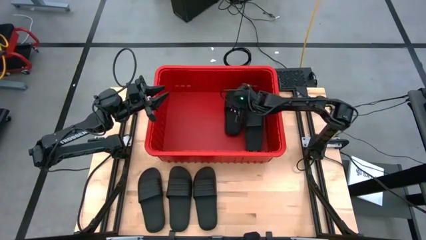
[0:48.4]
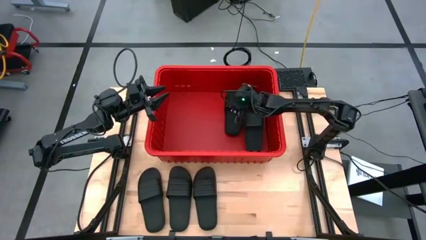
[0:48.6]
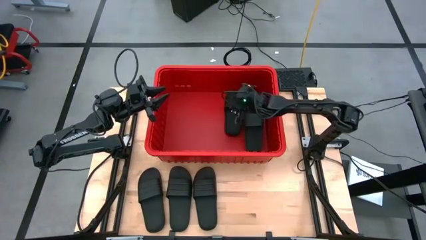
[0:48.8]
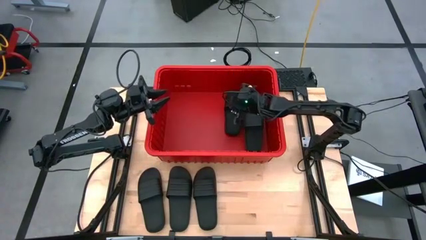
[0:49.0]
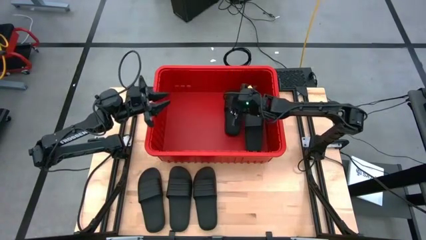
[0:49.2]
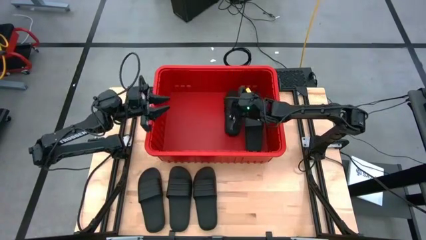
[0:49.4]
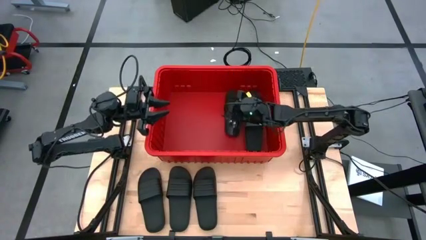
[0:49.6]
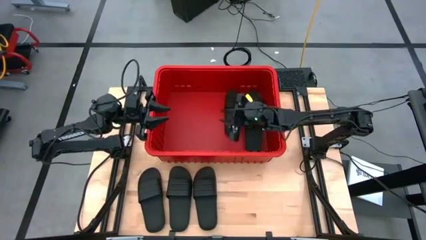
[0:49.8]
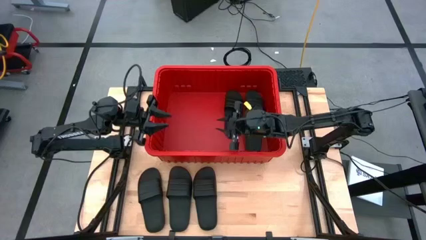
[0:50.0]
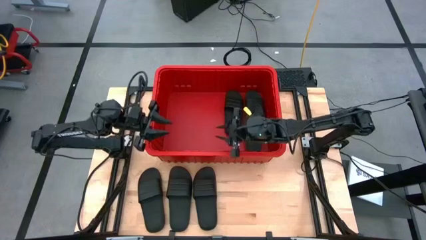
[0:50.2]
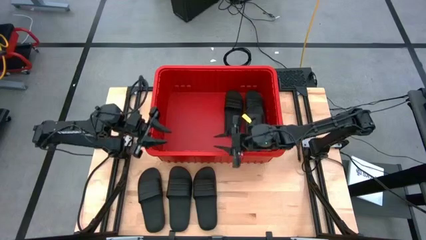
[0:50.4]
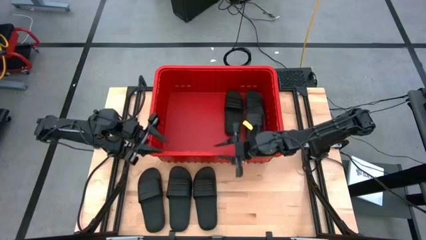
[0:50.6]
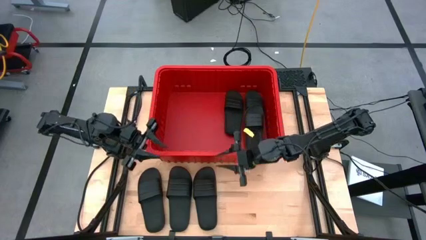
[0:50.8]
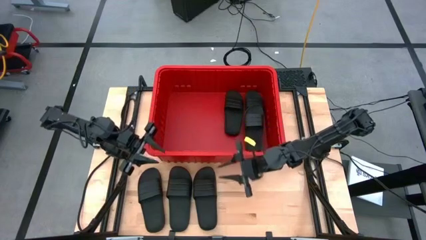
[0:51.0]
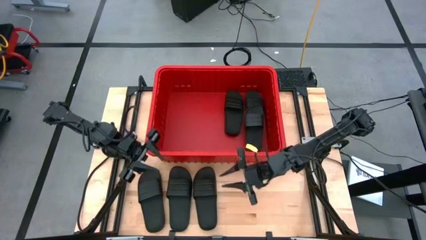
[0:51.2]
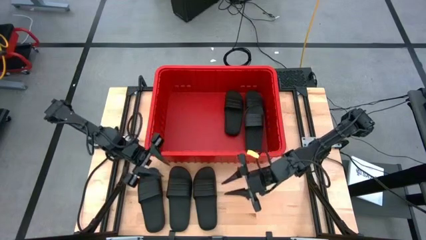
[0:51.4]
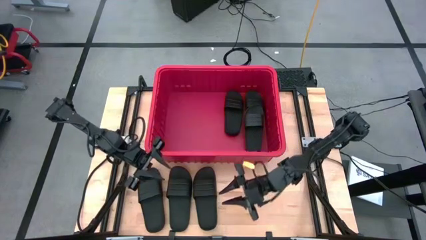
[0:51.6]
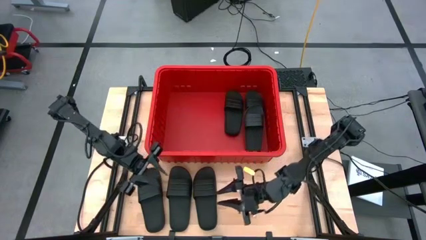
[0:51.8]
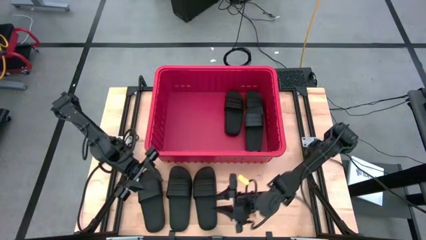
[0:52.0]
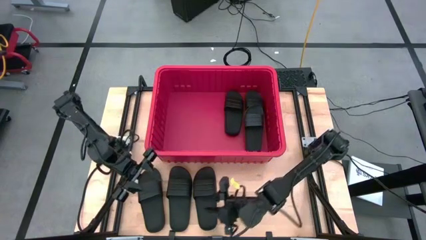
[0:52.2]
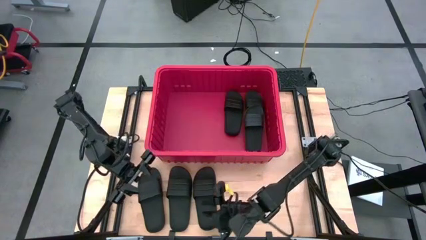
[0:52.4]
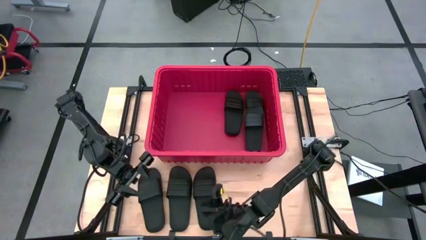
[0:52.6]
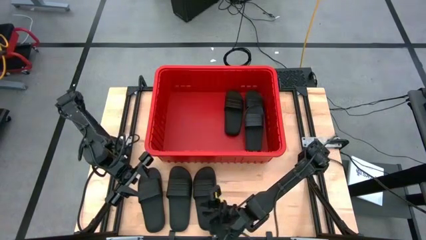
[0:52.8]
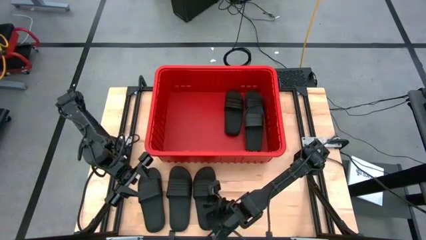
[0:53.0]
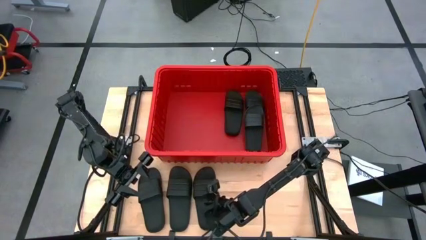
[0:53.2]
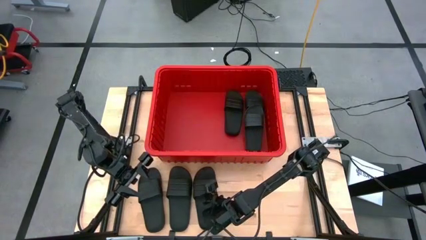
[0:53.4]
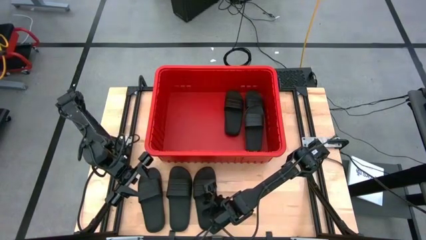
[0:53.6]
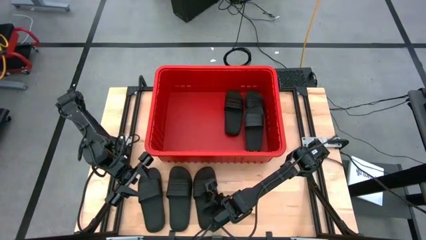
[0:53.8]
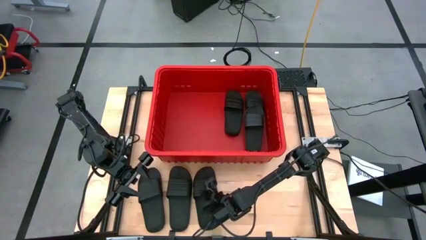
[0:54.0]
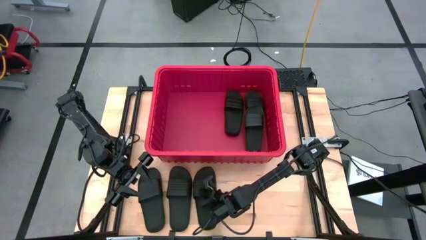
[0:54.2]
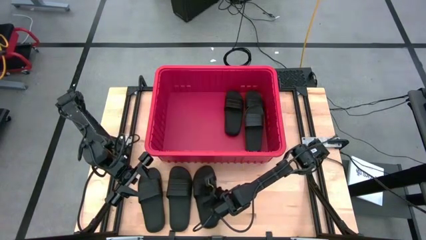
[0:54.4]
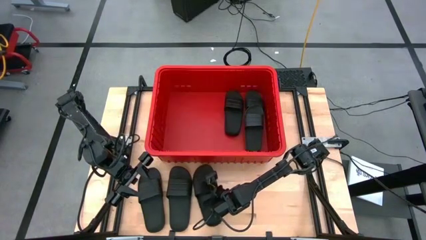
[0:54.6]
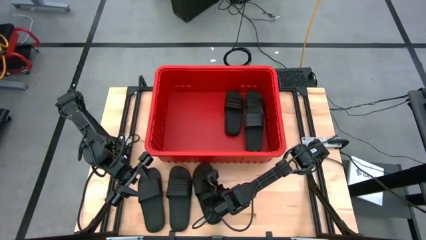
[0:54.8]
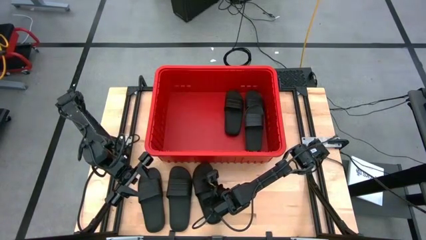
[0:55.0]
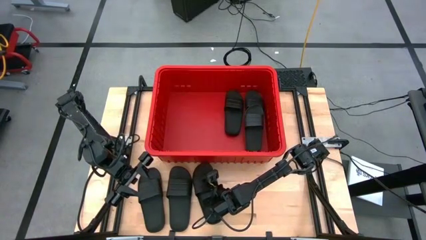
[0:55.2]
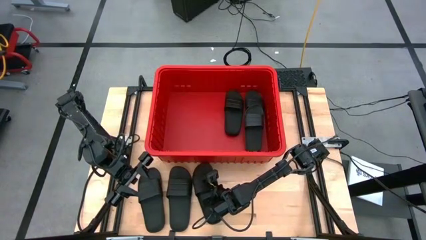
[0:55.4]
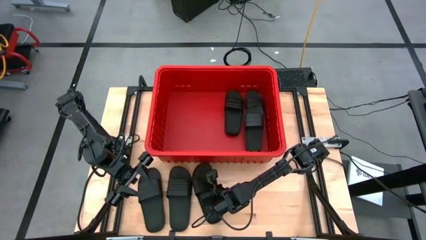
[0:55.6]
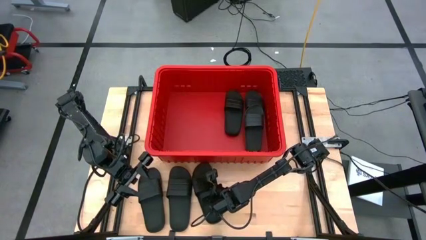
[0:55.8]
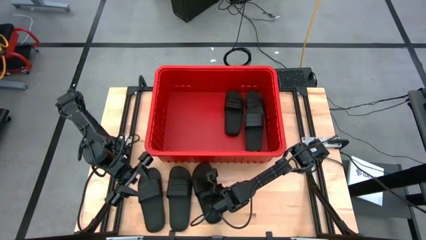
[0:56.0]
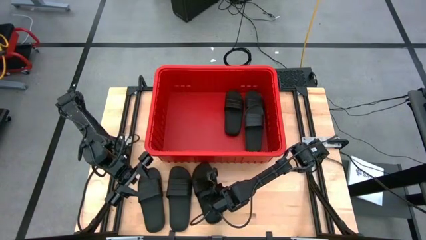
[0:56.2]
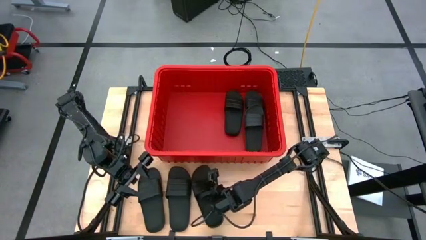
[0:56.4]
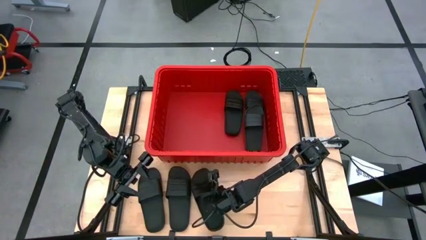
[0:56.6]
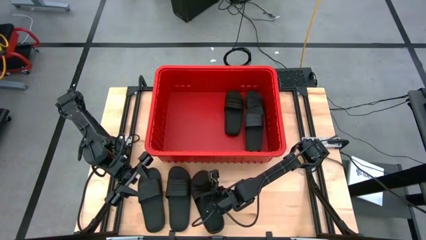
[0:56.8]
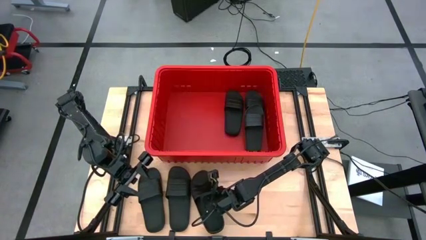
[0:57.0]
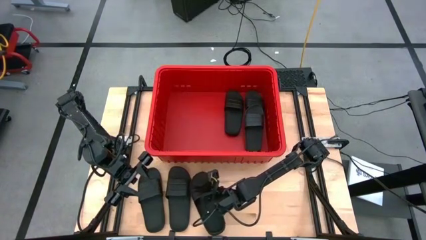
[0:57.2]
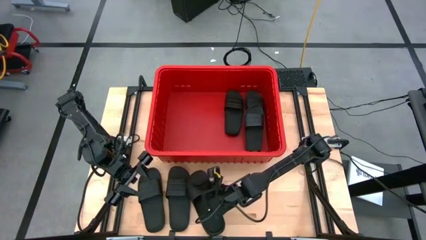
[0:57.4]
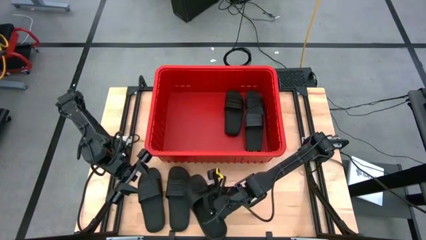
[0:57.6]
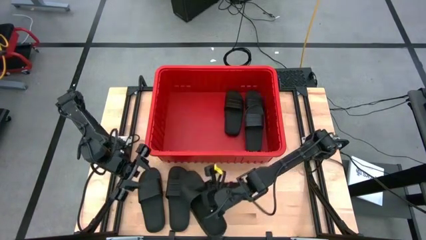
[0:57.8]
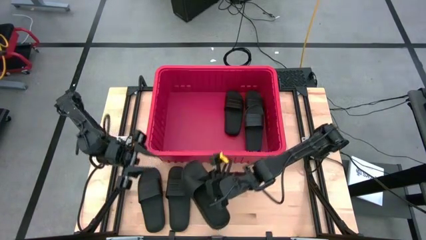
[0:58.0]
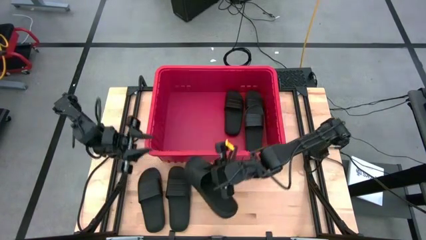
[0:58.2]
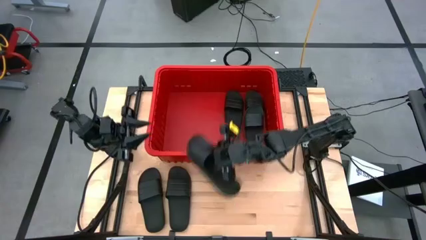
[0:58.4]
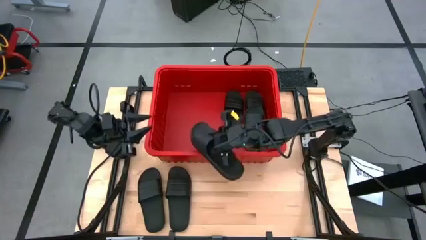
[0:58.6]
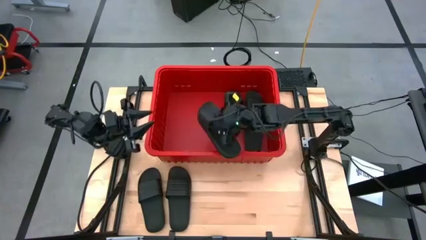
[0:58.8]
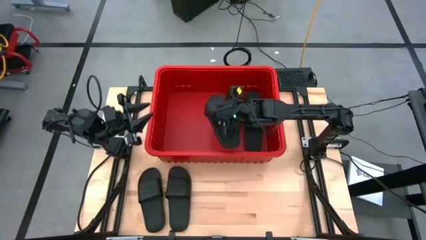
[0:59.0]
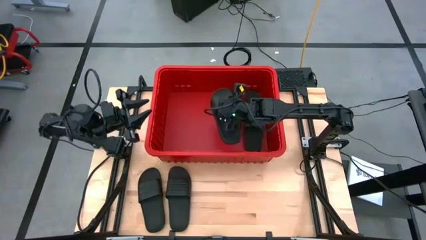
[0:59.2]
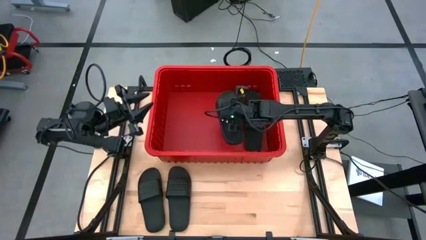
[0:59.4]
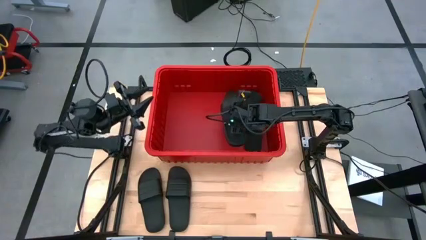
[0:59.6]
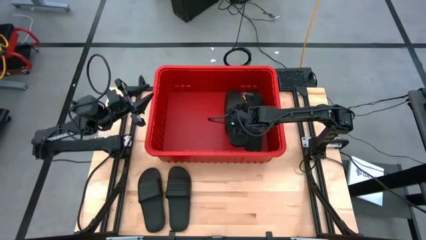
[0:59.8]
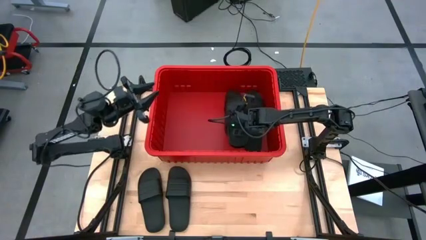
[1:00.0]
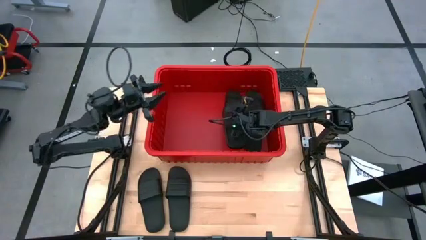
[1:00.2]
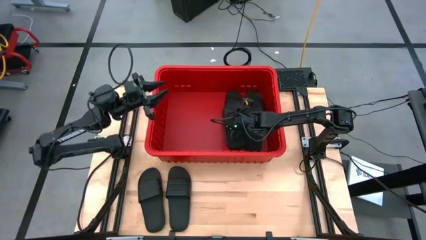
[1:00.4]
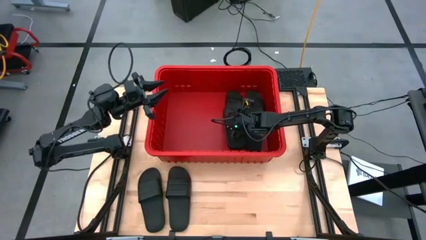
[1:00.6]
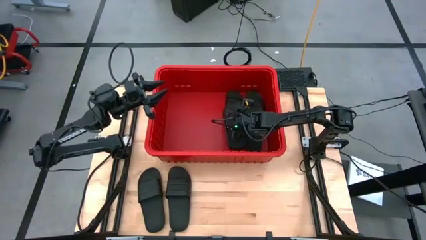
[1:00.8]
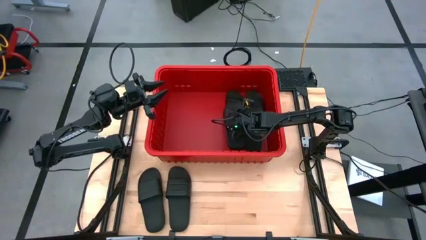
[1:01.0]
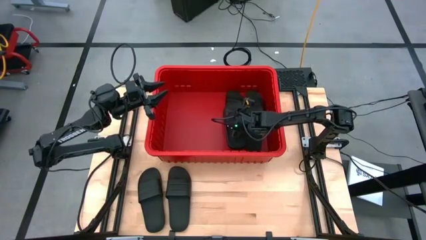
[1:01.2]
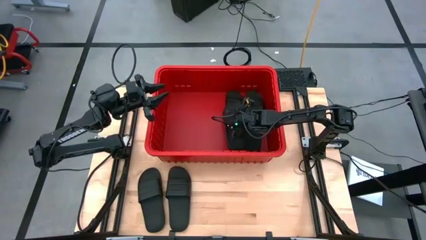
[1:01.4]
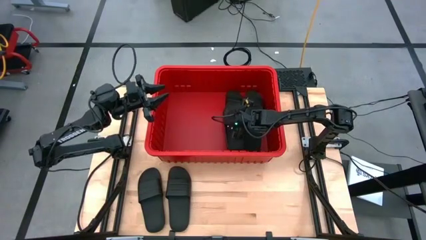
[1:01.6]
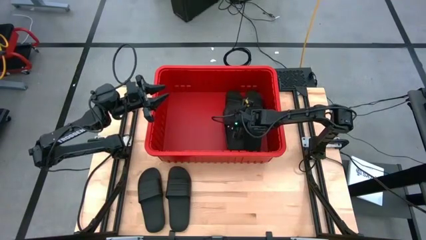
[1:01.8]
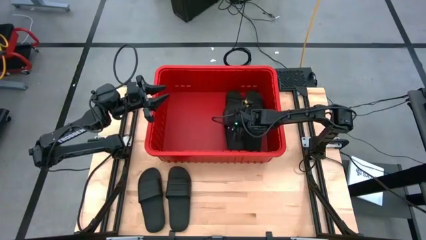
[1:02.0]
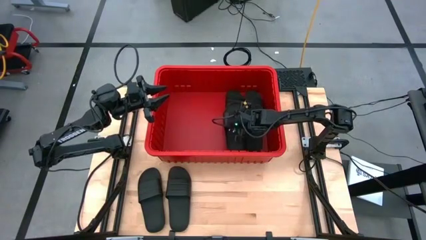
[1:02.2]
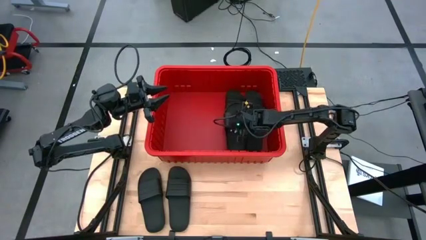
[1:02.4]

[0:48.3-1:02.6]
Task: Pick and place slides into bin
Put the black slide into the red bin

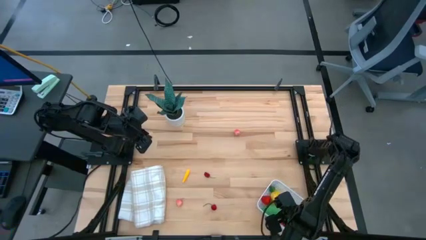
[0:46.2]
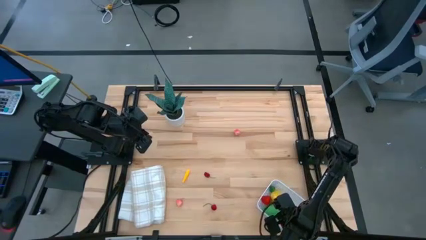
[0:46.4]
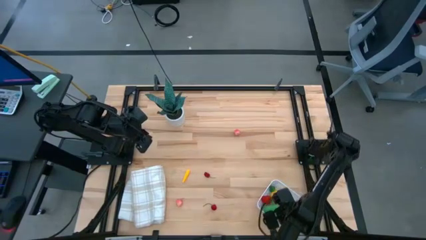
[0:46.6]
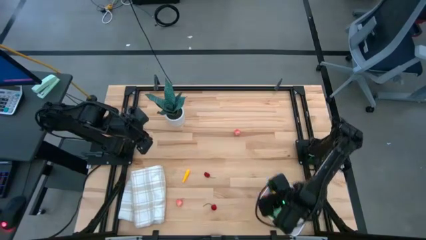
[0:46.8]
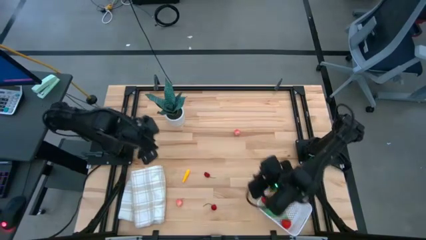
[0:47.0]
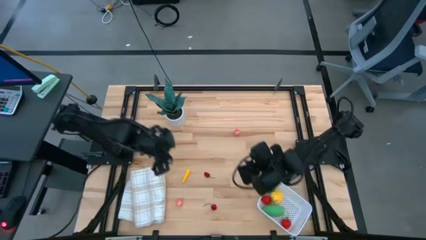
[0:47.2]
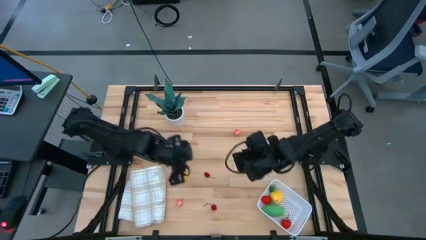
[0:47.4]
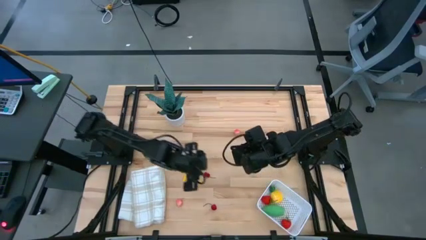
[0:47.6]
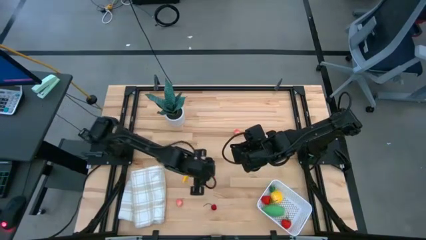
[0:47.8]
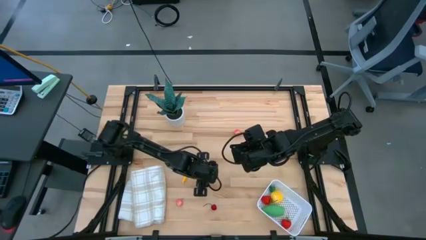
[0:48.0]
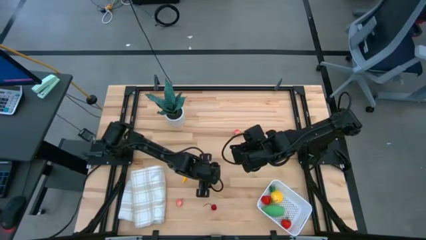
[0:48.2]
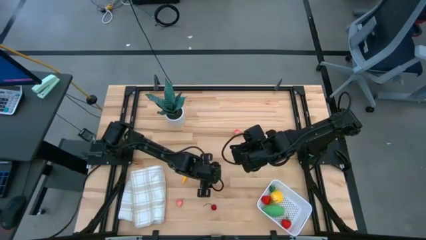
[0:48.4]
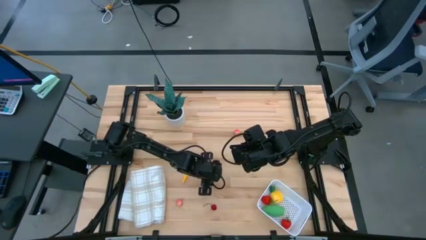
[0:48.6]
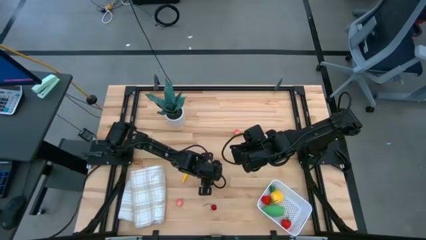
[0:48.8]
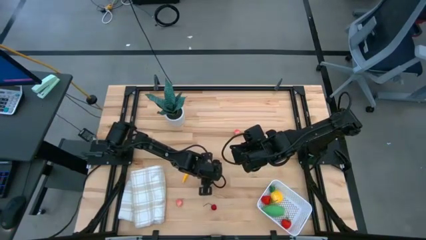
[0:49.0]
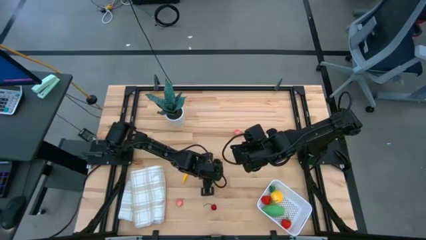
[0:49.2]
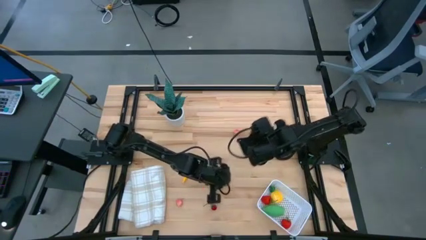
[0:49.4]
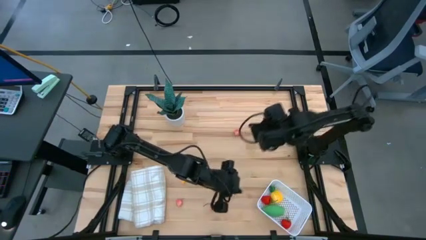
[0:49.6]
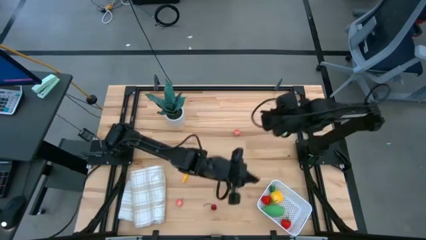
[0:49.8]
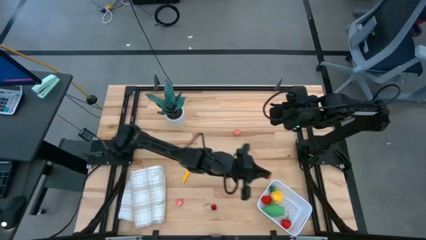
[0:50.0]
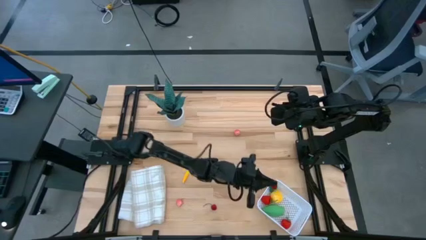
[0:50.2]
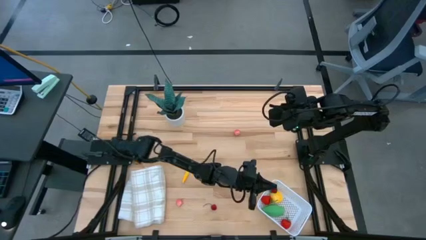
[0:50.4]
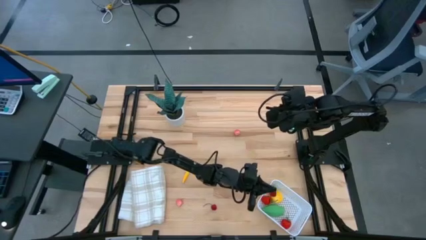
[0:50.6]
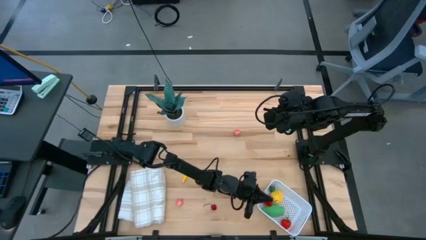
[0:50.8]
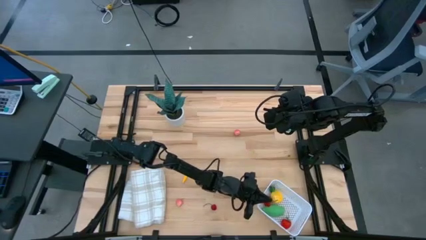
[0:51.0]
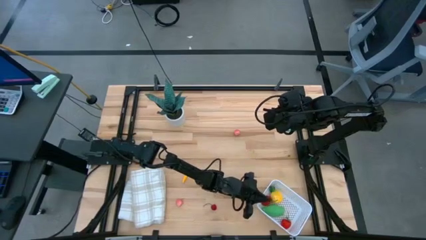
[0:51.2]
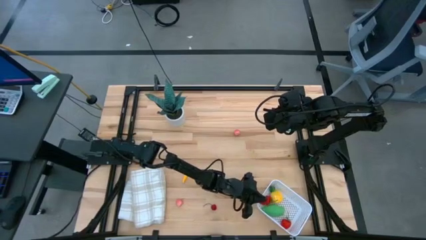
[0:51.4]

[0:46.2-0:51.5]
Task: Pick and placing Produce into tupperware
Put the top red cherry into the white bin
